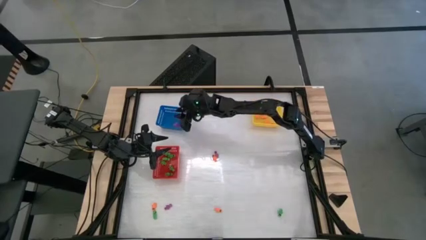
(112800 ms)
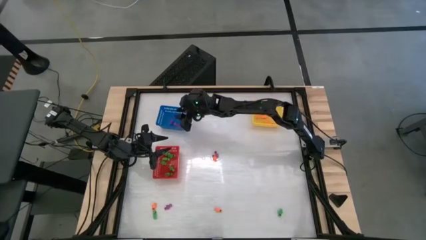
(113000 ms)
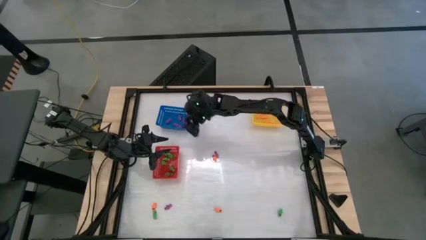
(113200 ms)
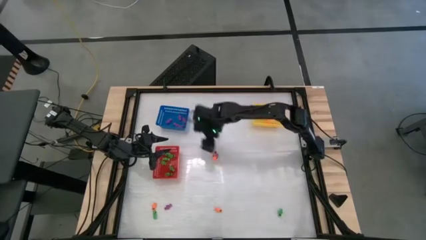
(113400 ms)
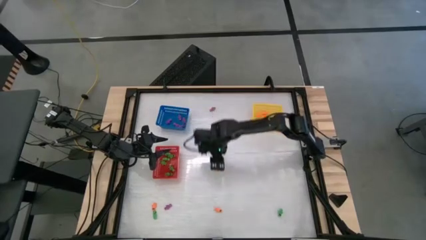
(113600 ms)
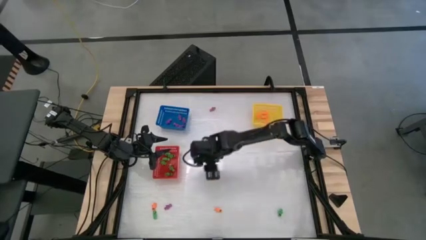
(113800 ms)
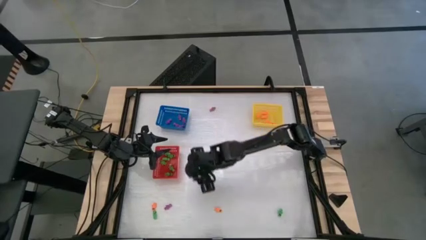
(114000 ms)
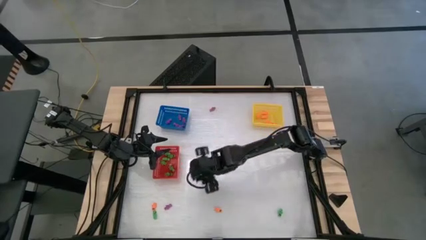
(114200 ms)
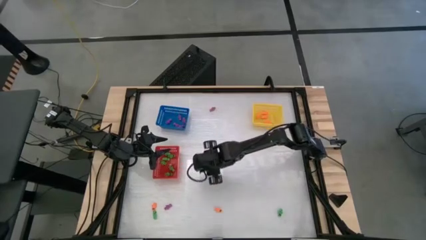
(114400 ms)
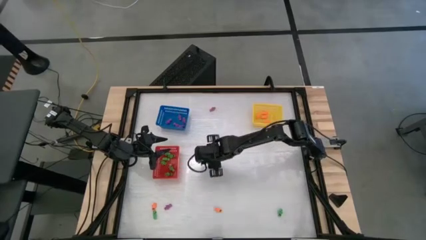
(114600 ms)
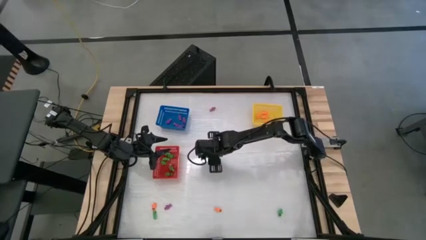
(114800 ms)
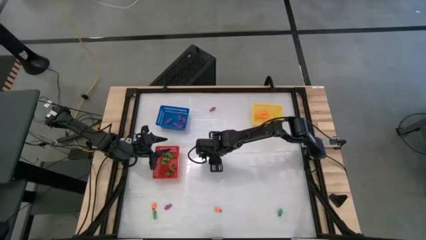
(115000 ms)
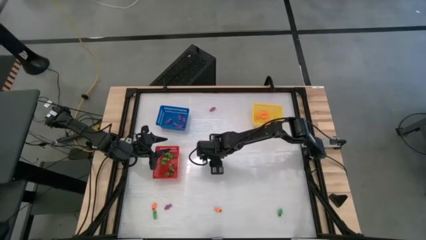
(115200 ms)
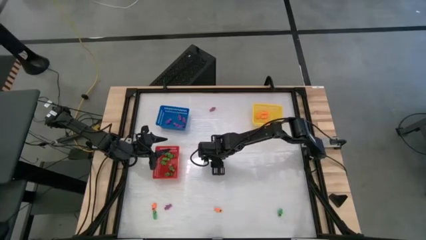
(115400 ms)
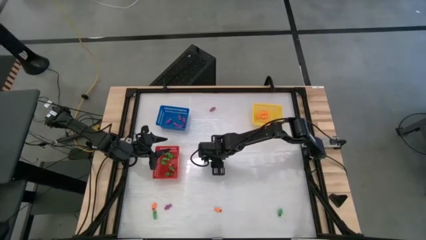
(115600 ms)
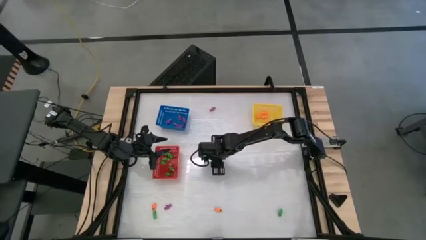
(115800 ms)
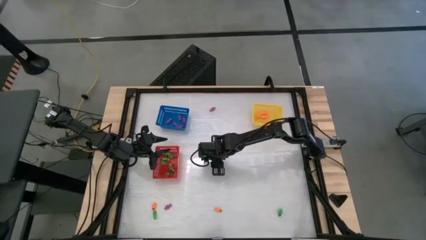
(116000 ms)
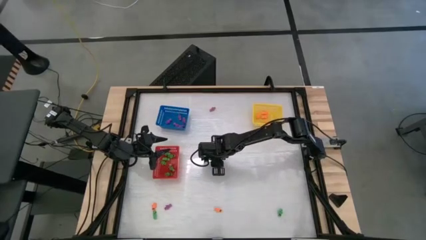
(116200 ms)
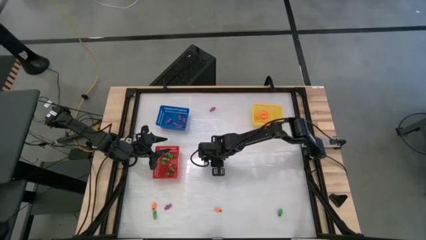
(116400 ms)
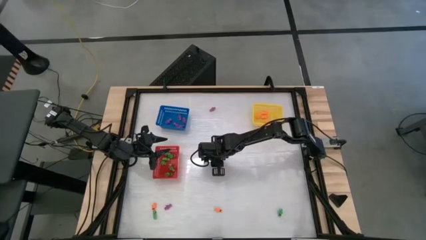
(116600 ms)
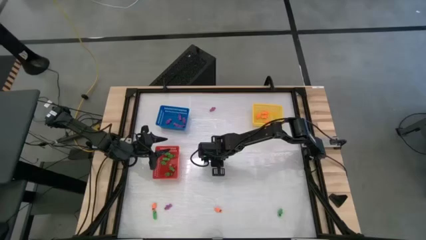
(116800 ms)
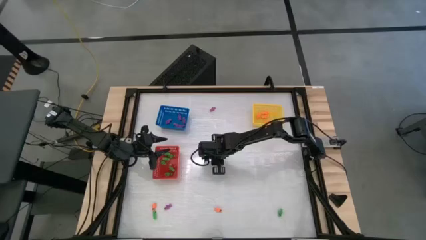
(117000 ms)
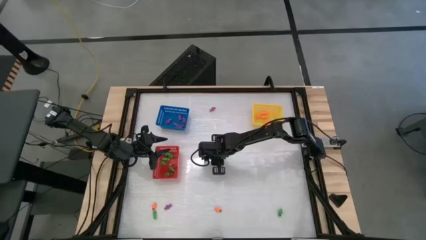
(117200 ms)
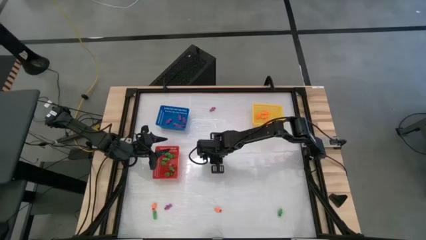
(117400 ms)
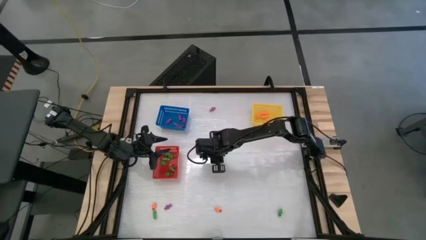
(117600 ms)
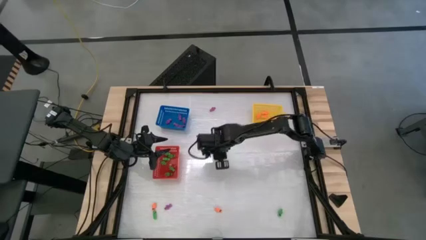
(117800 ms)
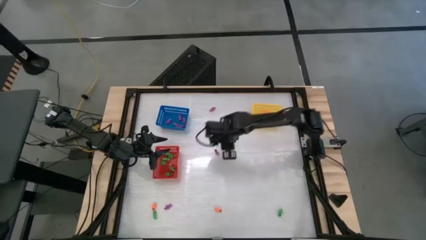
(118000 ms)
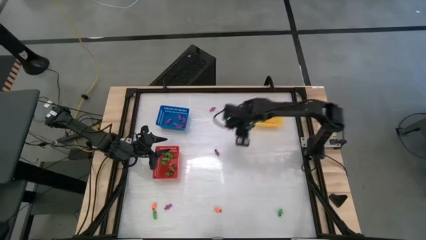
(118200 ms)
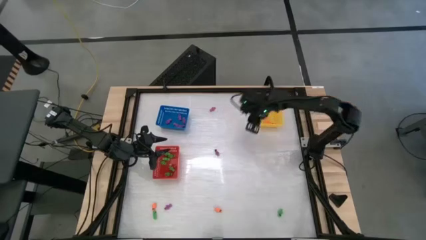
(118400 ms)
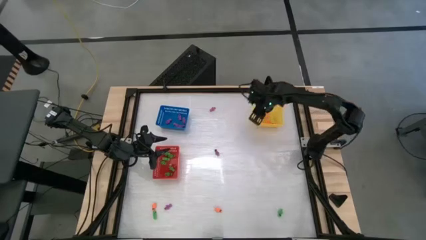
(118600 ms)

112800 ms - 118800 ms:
Task: Sort Halloween decoration
Put the orange skeleton toy into the yellow bin

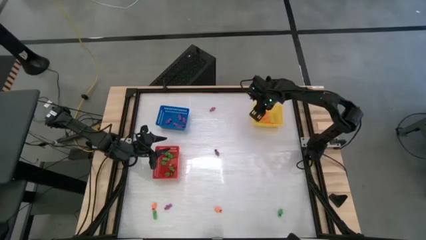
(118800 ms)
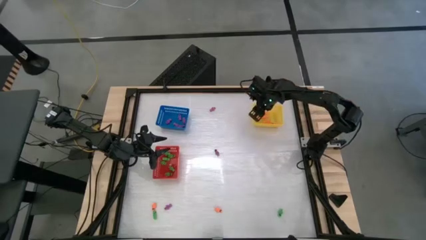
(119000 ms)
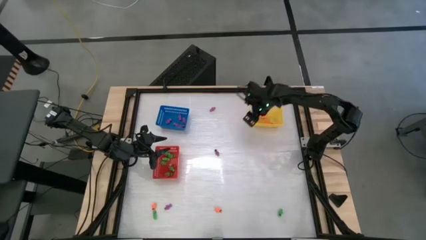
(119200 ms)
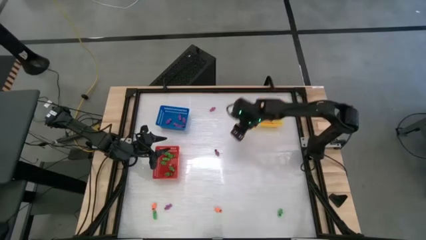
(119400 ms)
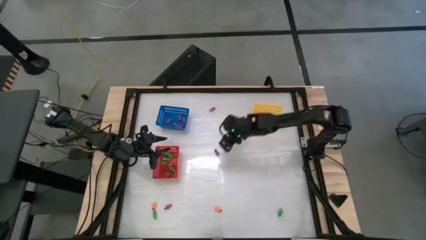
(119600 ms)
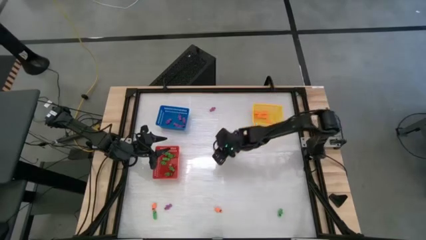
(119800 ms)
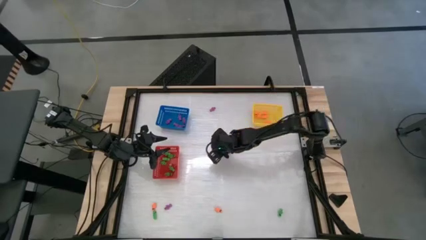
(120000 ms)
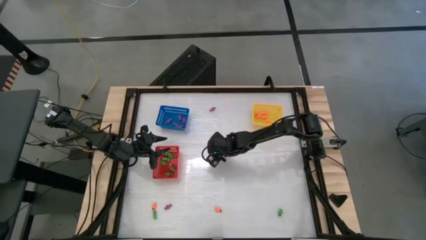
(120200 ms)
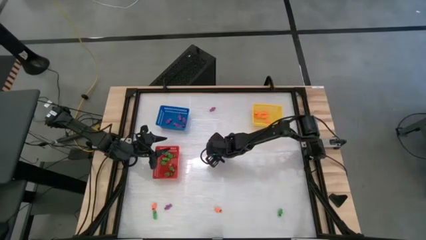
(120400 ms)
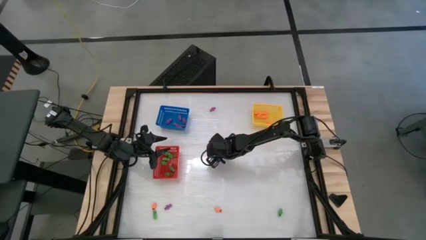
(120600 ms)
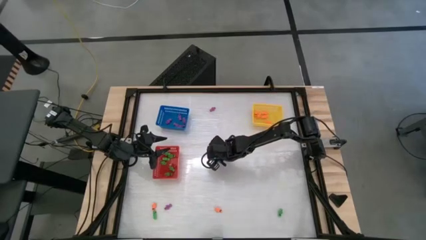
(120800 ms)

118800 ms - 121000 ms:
Put the violet skeleton toy into the blue bin

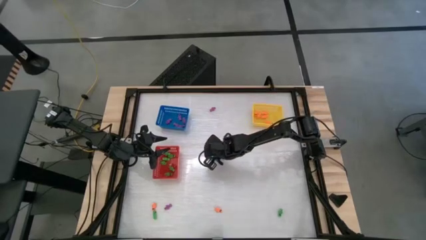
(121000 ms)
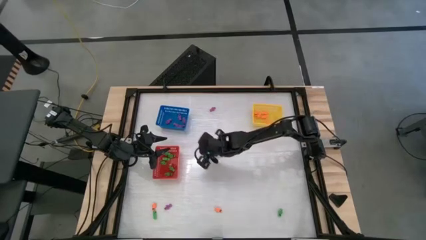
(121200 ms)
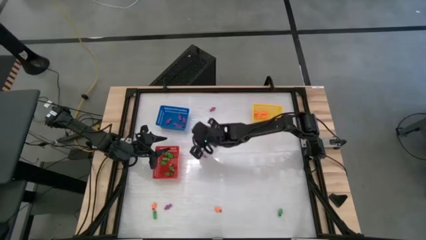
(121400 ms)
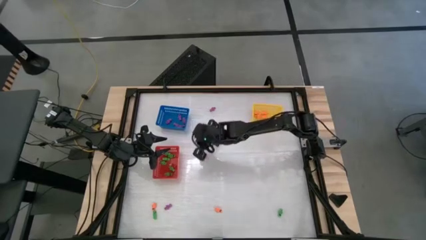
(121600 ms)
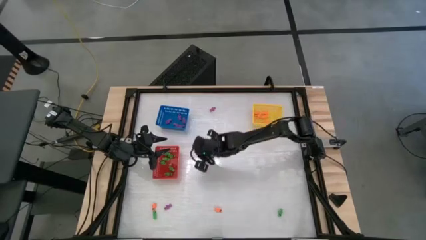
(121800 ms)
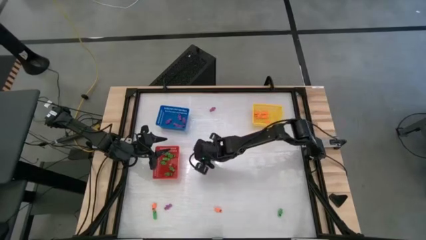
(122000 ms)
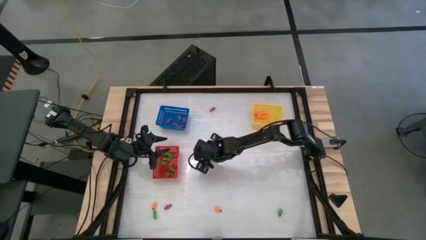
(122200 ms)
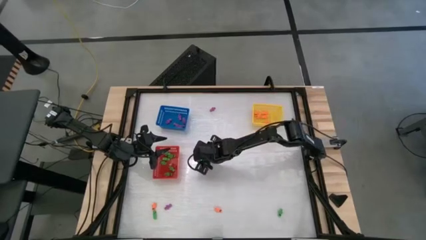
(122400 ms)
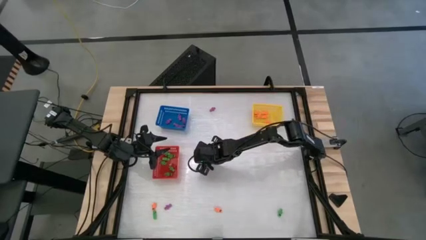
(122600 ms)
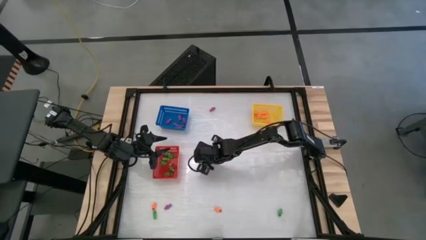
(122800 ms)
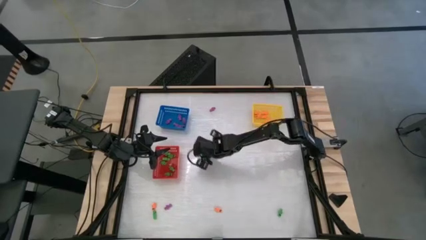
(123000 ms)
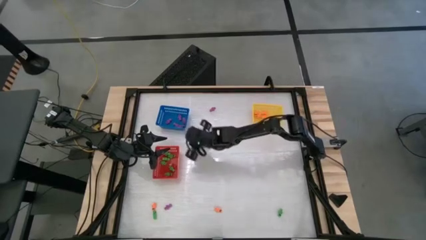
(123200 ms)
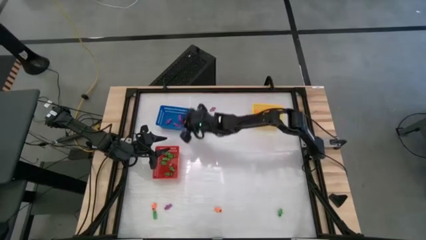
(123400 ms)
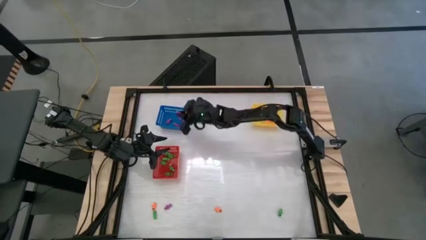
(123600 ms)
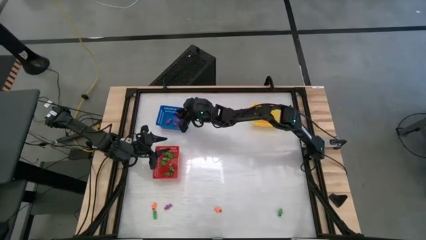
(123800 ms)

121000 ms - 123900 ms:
Put the violet skeleton toy into the blue bin

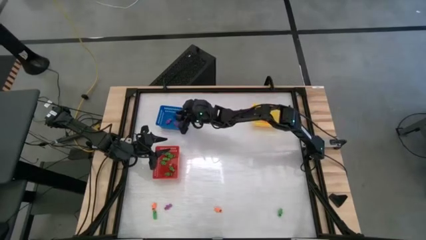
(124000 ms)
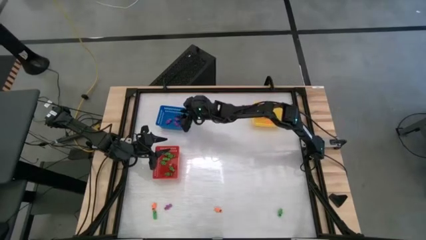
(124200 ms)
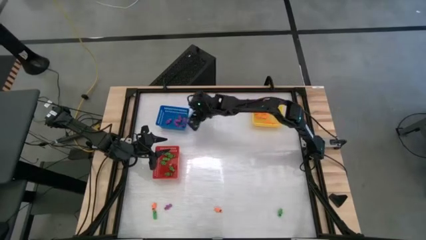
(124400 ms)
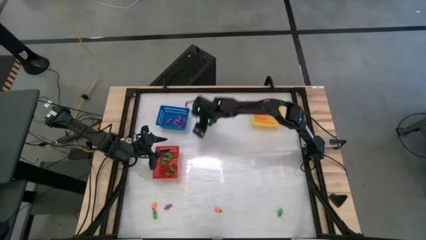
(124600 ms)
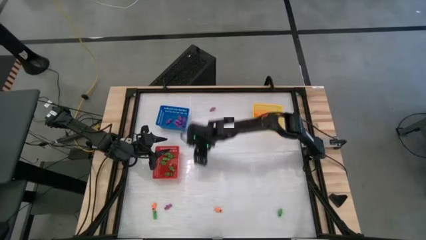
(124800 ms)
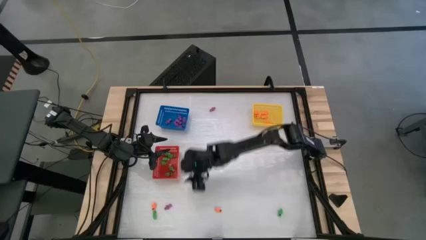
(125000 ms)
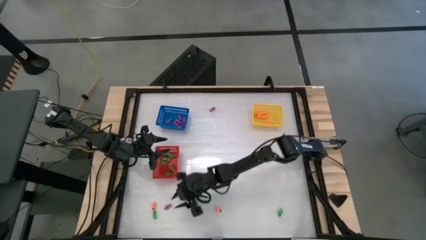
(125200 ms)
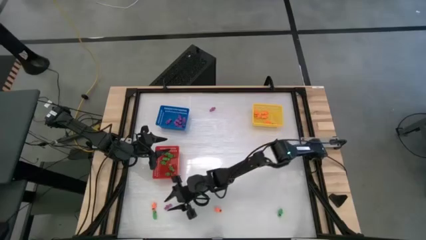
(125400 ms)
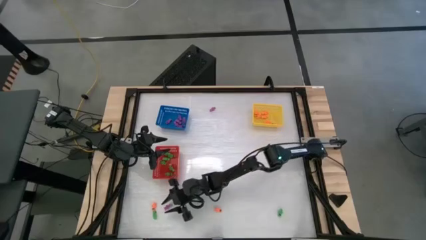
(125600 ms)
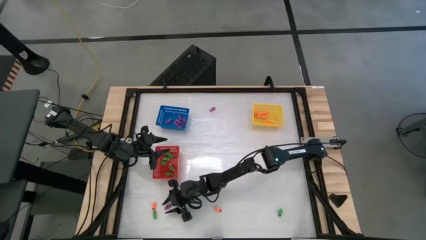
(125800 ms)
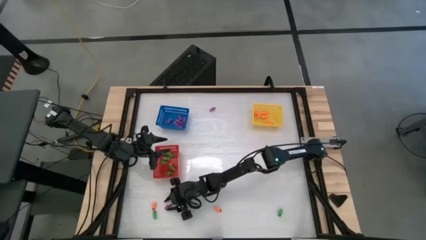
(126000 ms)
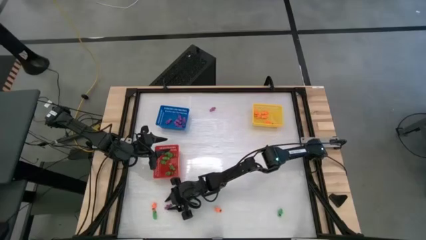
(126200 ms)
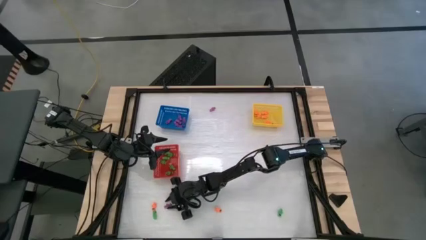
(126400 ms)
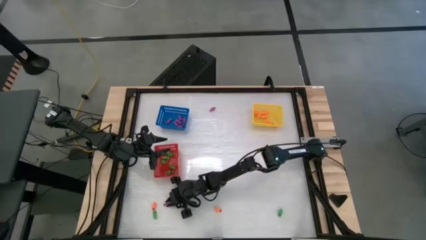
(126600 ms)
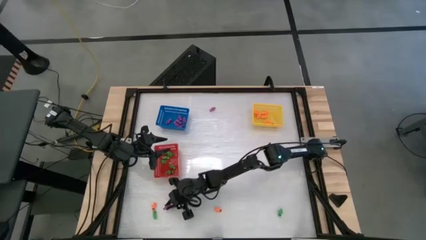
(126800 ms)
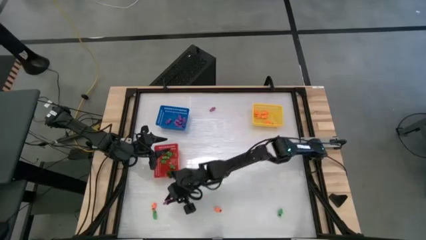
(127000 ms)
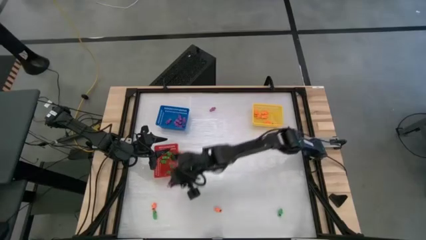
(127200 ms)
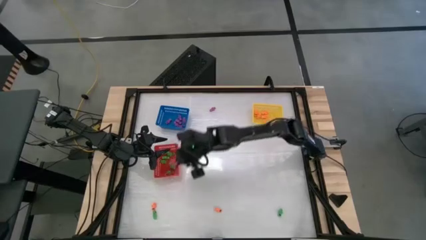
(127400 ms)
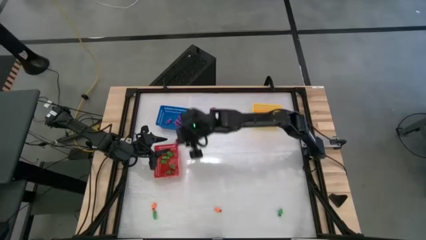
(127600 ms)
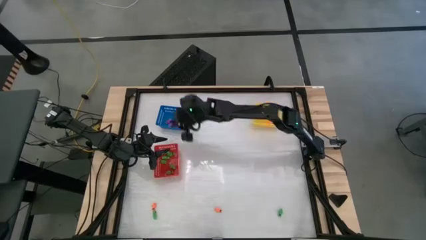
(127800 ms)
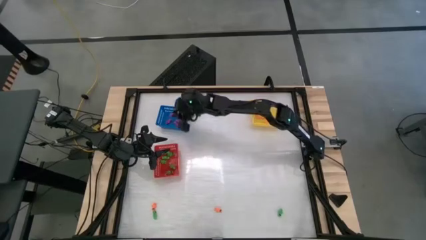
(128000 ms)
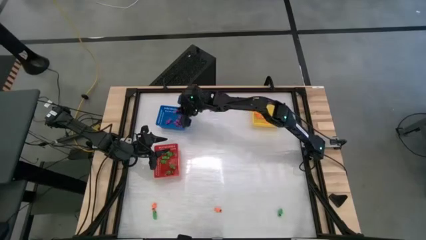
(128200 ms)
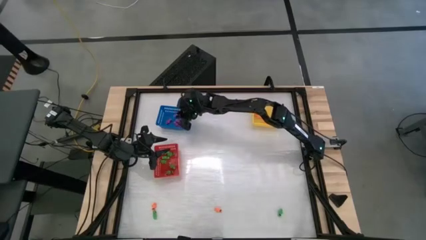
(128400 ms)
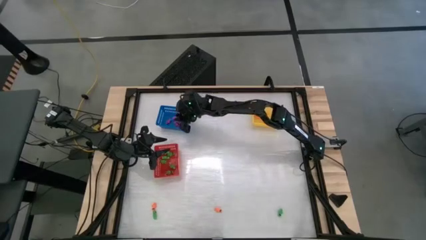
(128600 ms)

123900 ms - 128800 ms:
Put the violet skeleton toy into the yellow bin
